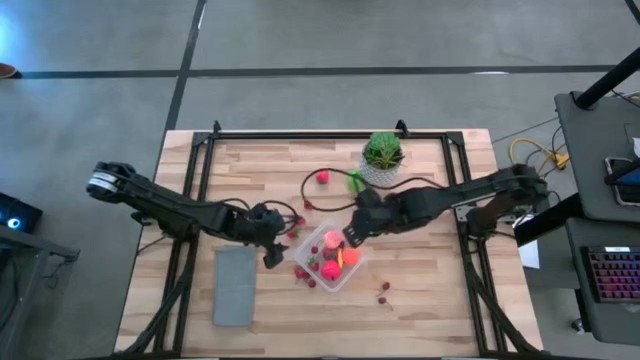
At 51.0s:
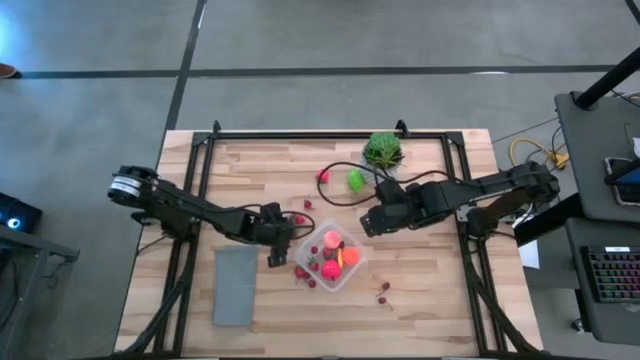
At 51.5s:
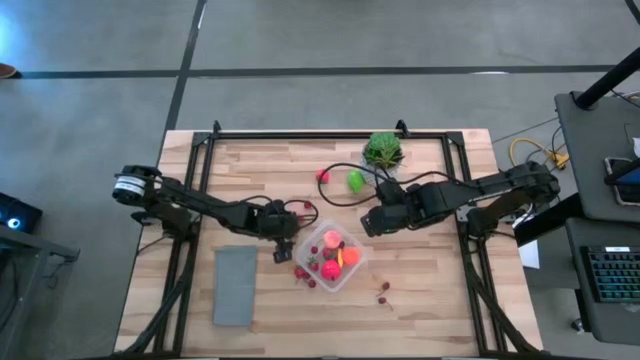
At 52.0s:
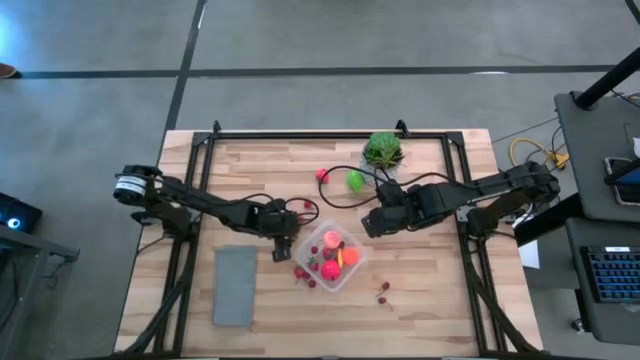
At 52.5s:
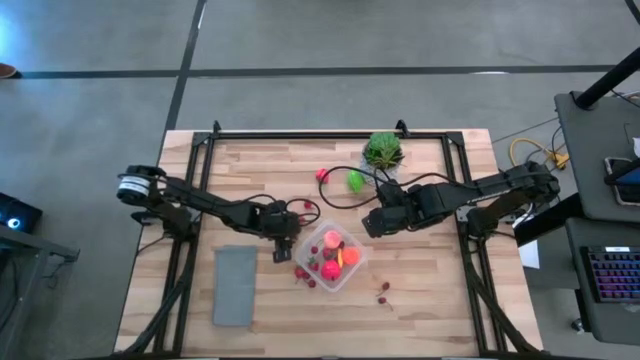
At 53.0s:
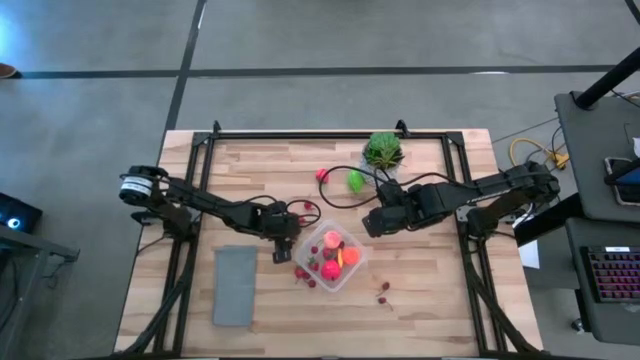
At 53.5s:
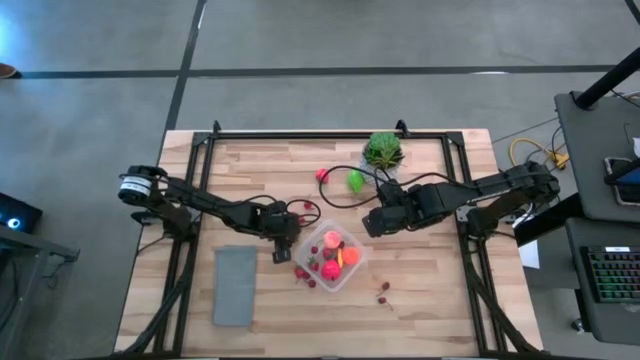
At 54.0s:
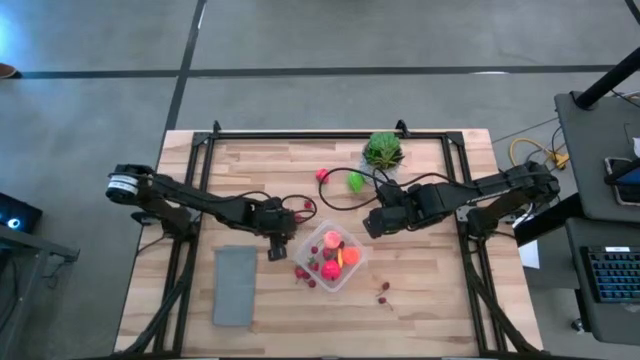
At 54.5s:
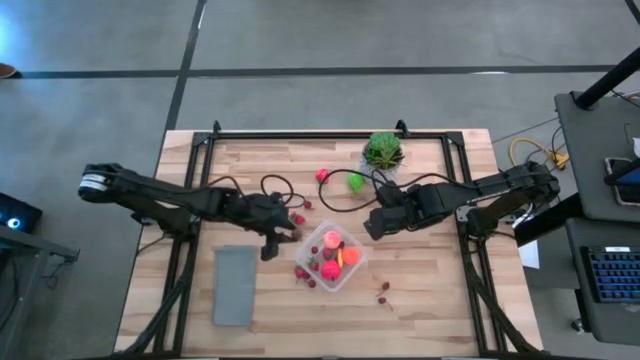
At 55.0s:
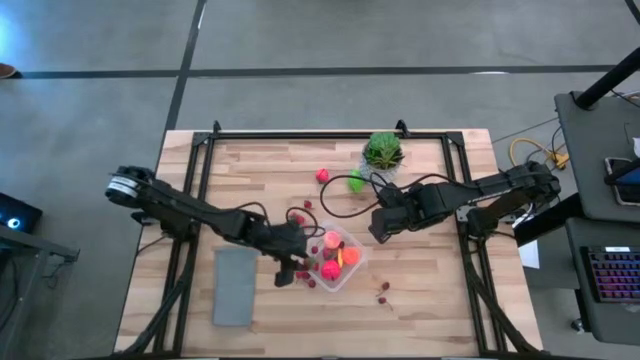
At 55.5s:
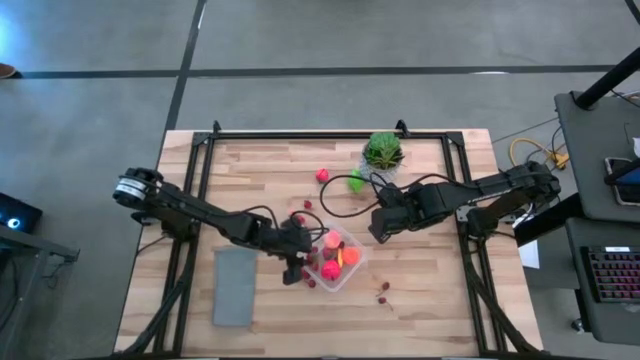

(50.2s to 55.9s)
Task: Pick and placing Produce into tupperware
Put the red strawberry into the transparent bin

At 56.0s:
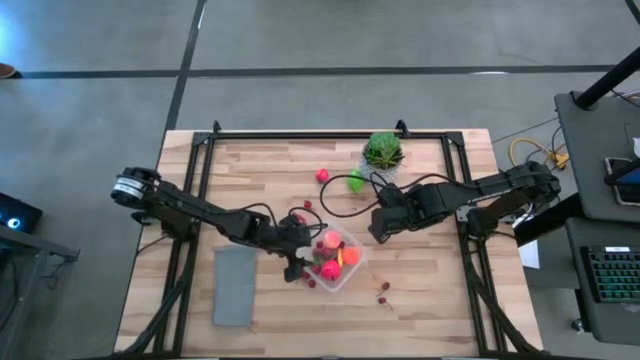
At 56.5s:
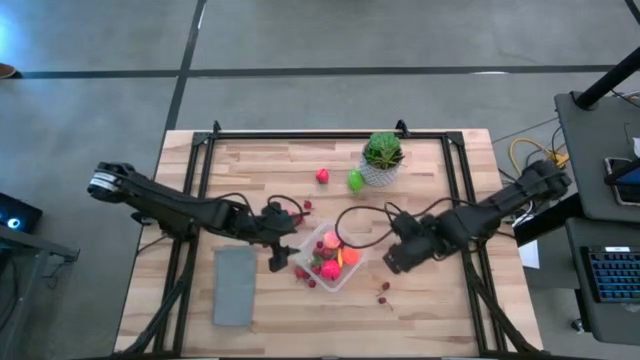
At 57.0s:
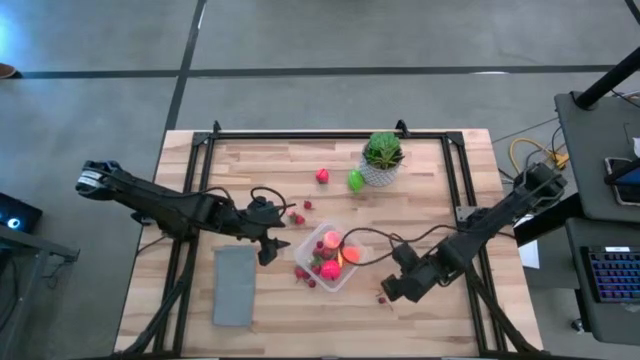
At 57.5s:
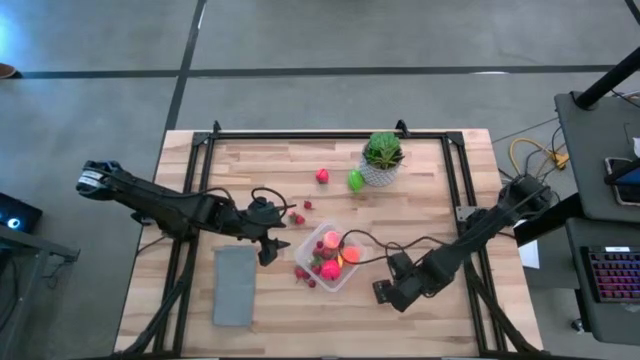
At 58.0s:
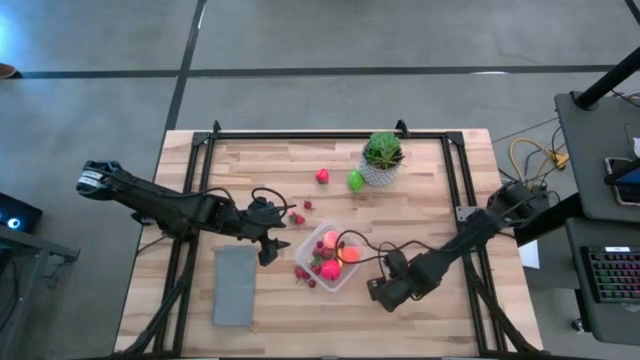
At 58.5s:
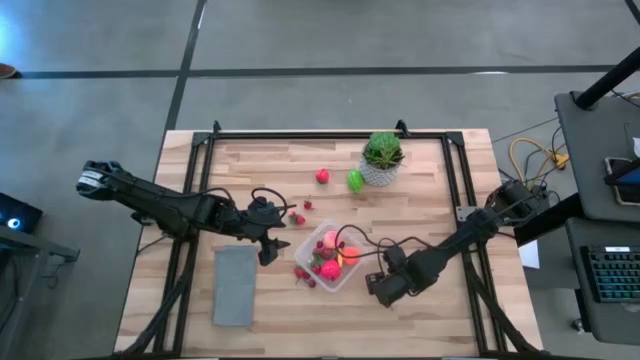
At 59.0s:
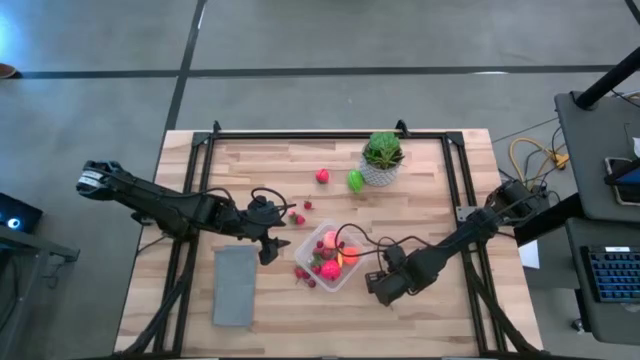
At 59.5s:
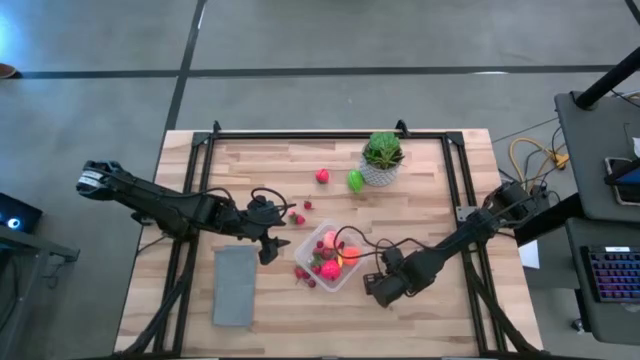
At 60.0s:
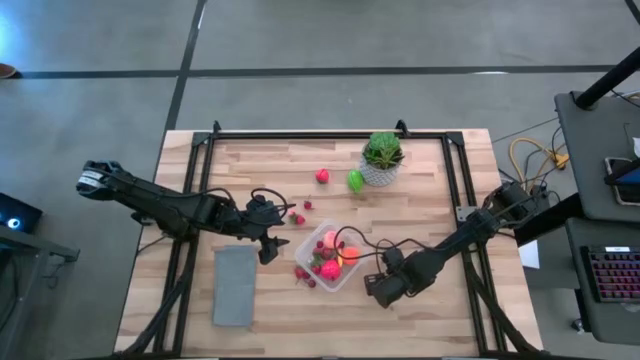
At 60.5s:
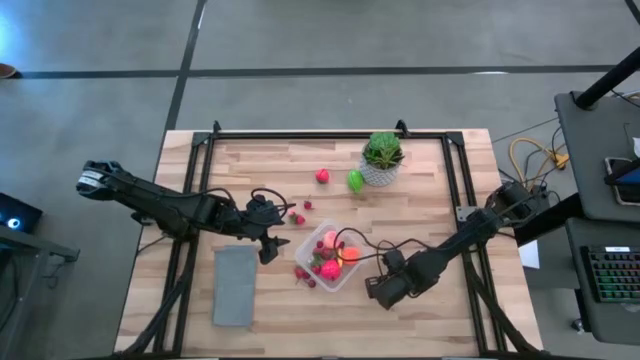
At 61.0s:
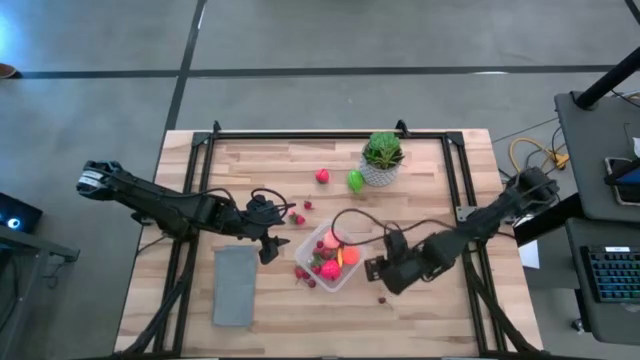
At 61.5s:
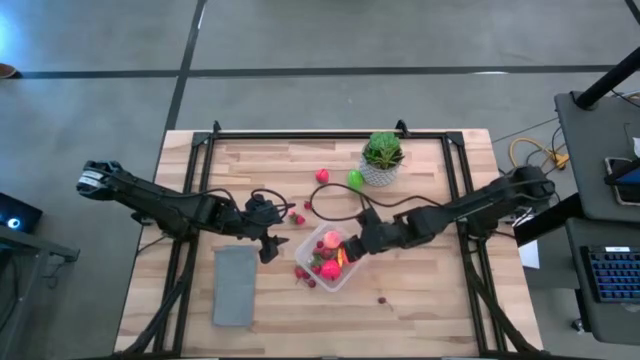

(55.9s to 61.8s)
Put the red cherry into the transparent bin

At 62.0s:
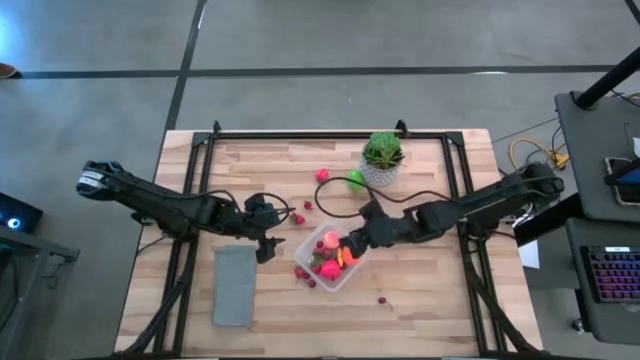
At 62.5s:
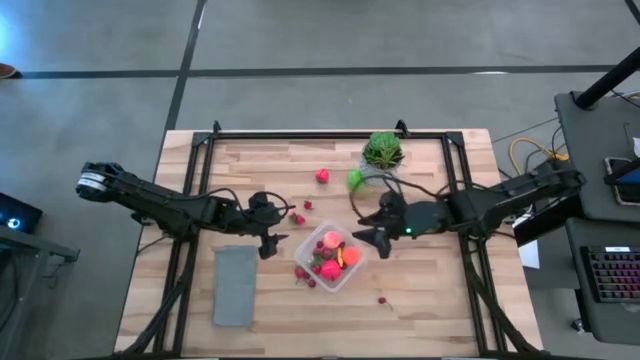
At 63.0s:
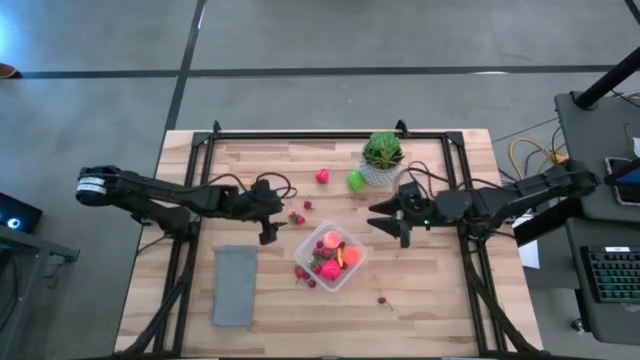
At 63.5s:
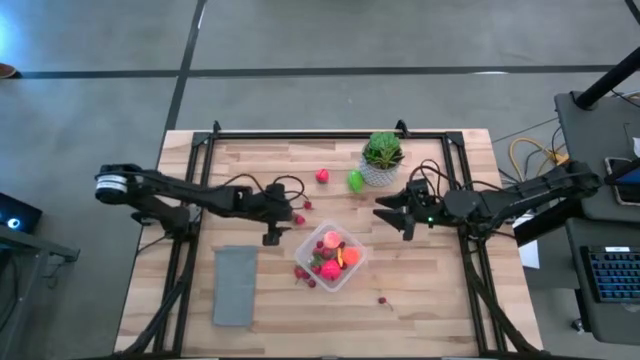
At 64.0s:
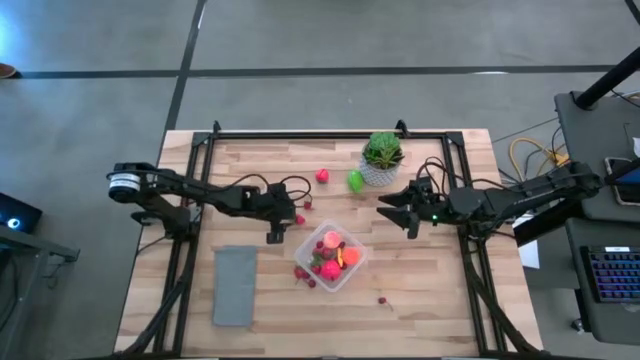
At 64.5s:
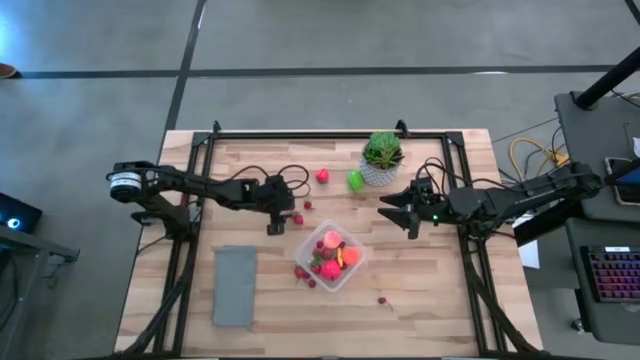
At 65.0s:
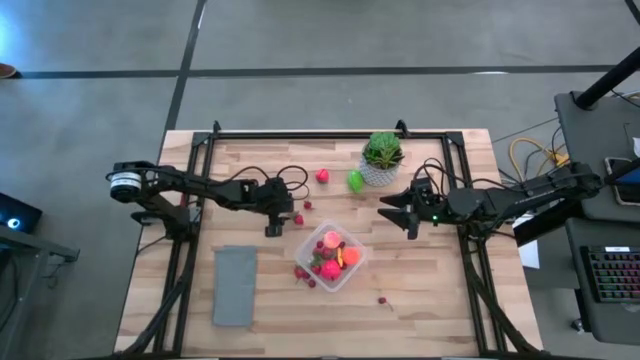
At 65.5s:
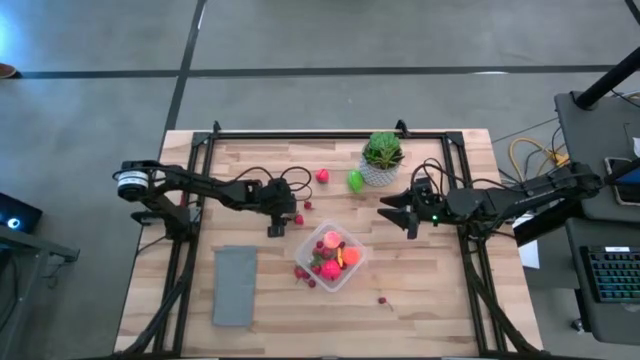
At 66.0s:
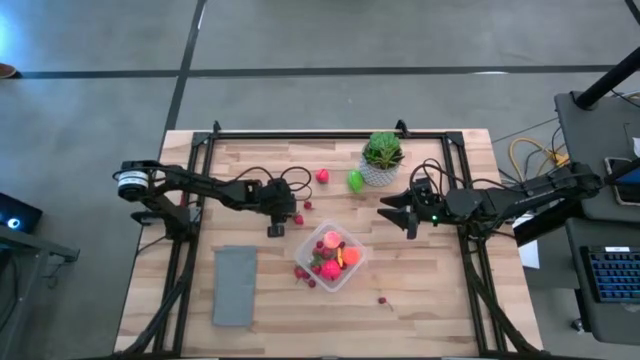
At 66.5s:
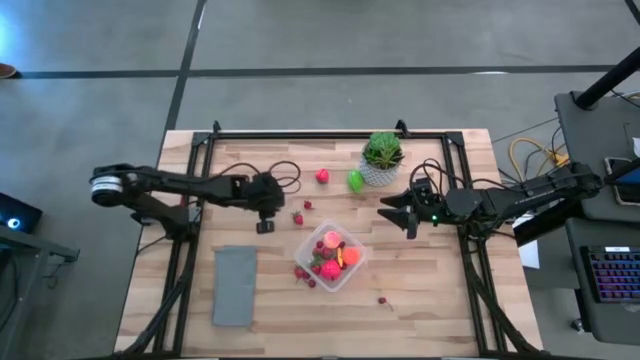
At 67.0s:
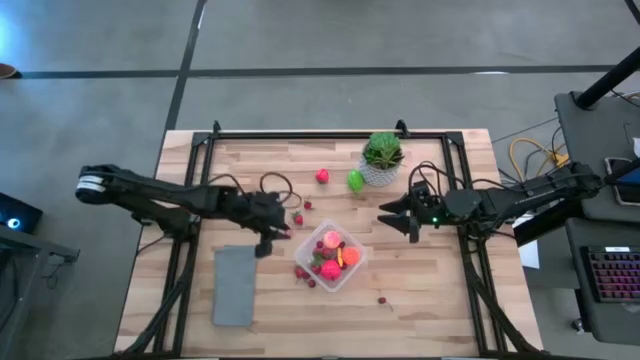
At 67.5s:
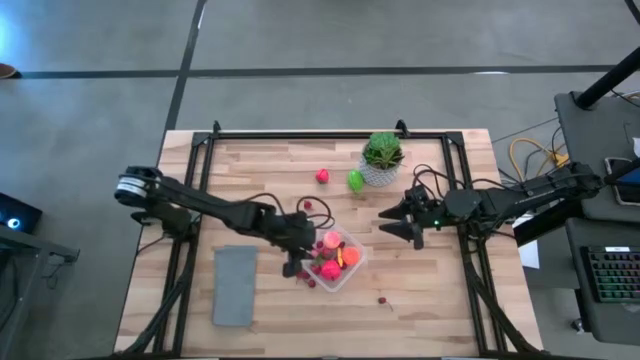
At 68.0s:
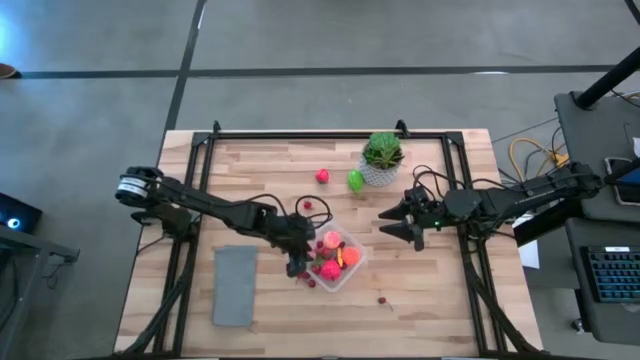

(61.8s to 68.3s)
Put the peach into the transparent bin

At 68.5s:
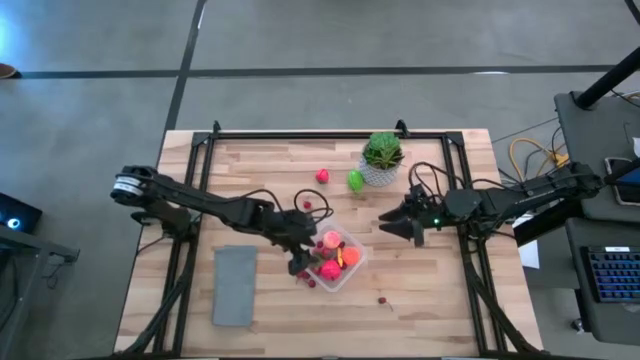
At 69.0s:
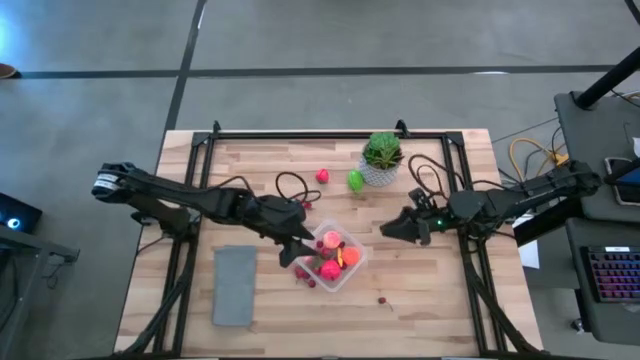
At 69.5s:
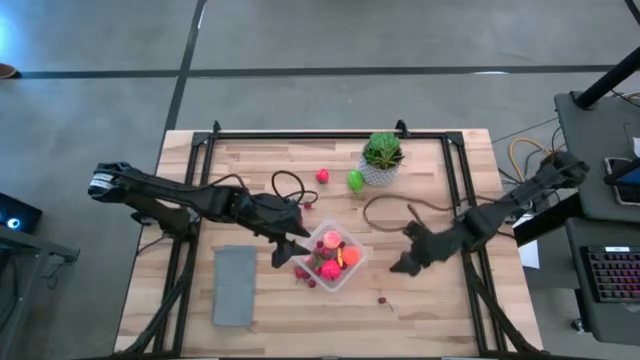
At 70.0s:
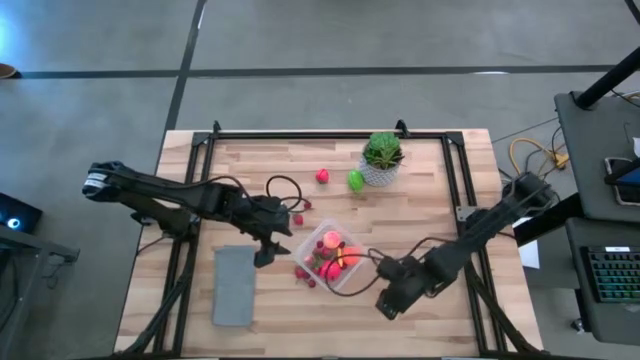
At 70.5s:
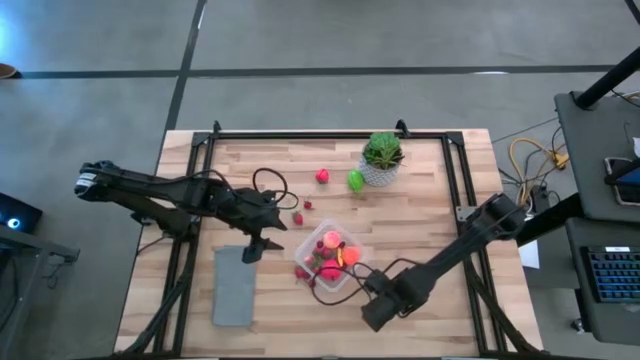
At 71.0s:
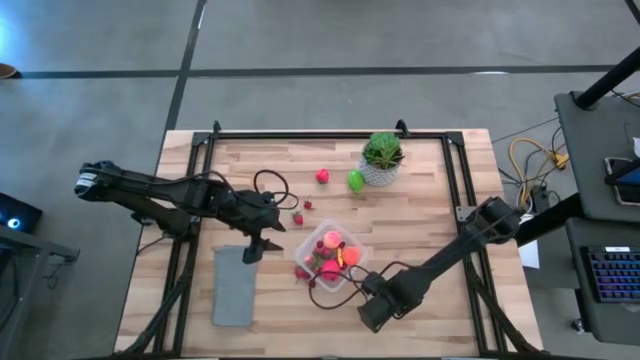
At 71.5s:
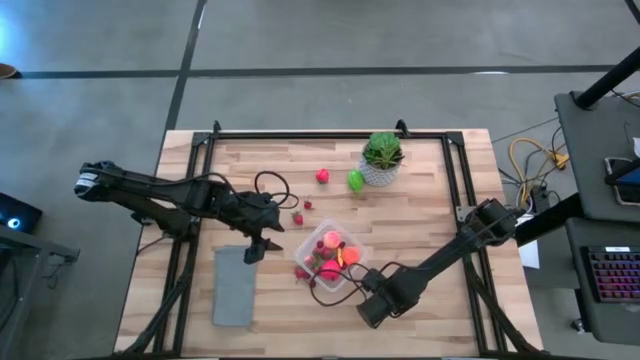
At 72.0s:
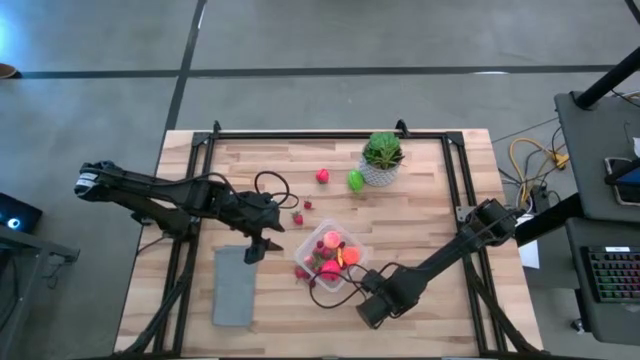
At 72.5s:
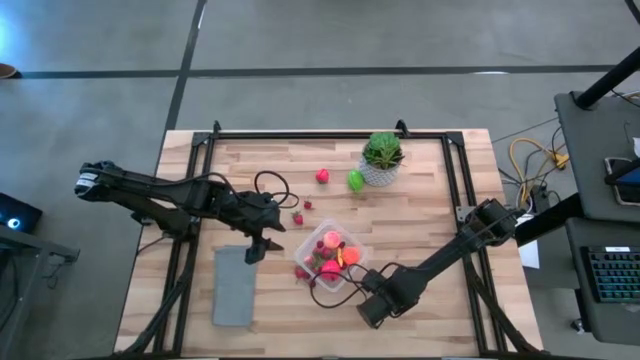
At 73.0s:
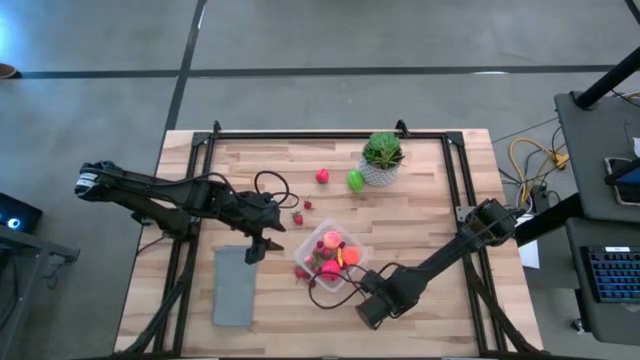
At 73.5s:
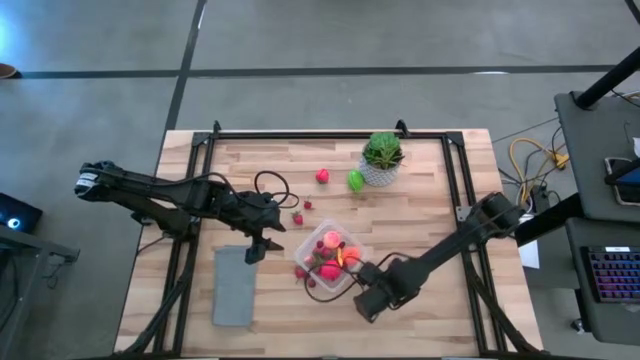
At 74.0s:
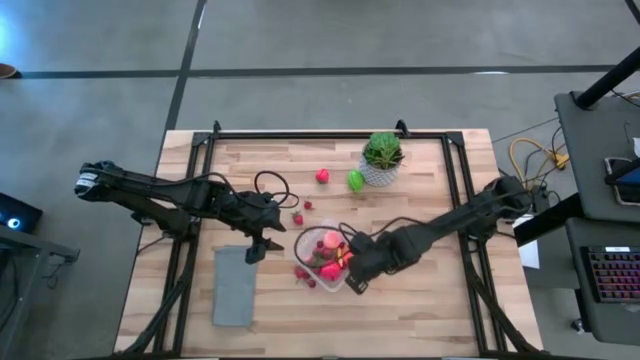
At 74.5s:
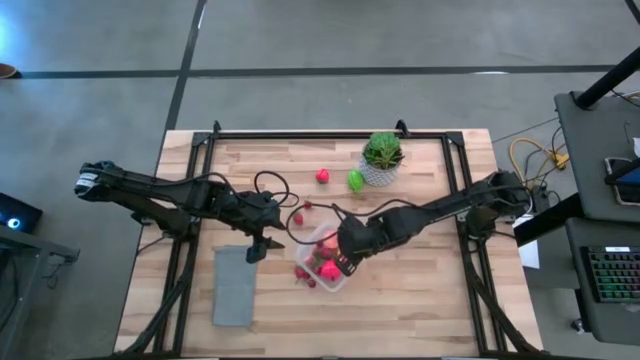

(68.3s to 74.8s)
Put the red cherry into the transparent bin
